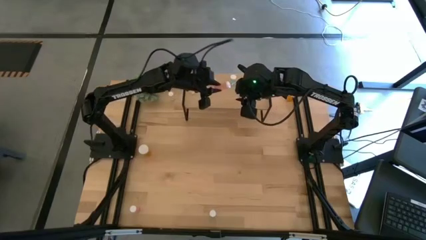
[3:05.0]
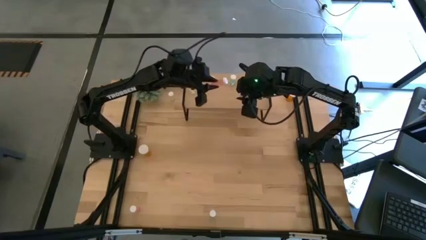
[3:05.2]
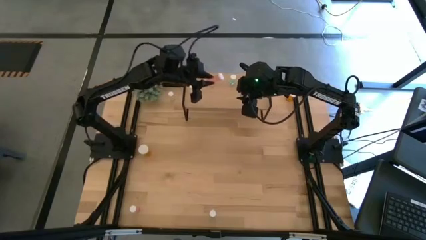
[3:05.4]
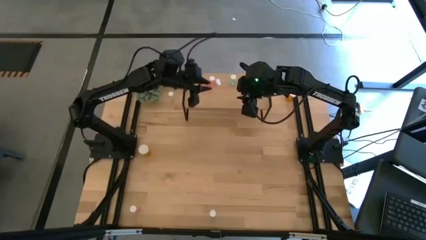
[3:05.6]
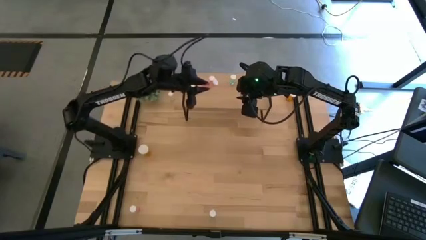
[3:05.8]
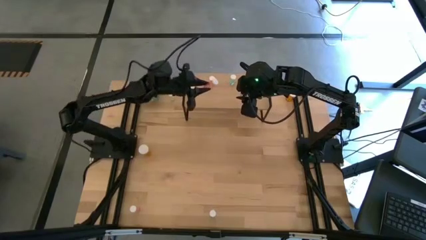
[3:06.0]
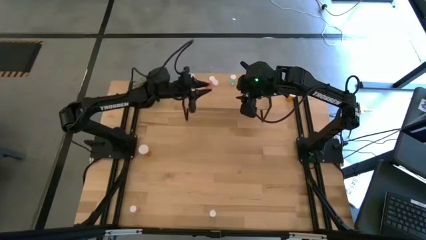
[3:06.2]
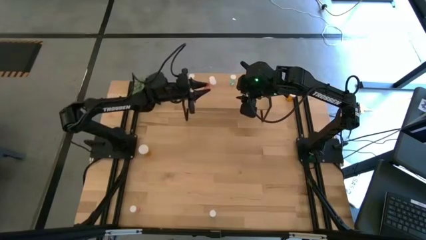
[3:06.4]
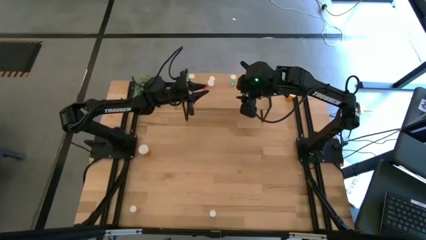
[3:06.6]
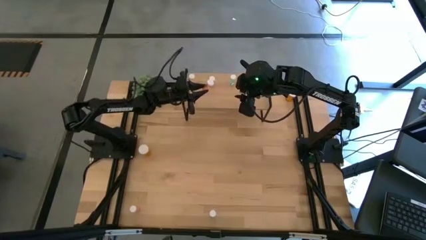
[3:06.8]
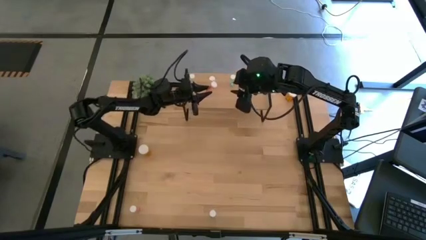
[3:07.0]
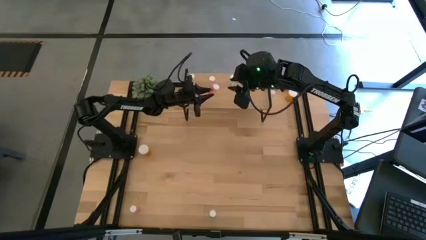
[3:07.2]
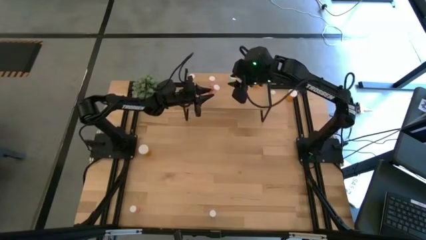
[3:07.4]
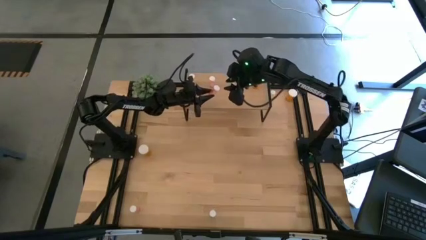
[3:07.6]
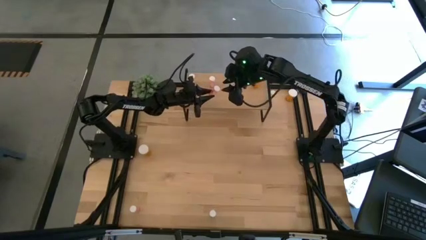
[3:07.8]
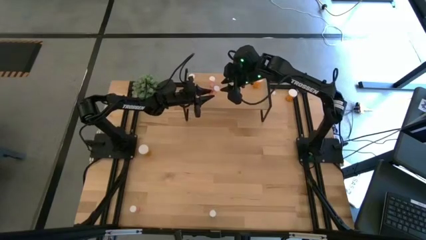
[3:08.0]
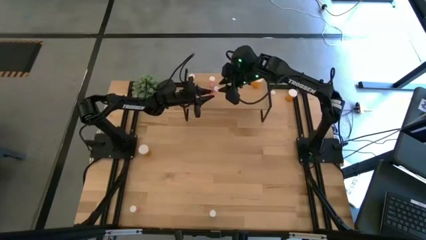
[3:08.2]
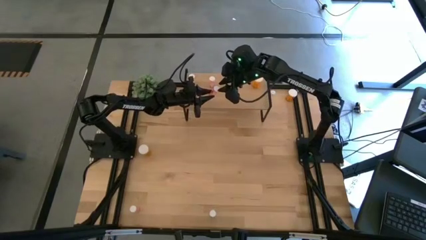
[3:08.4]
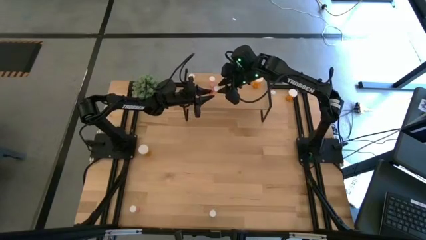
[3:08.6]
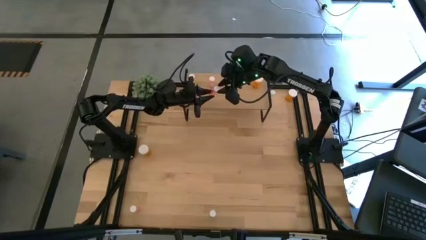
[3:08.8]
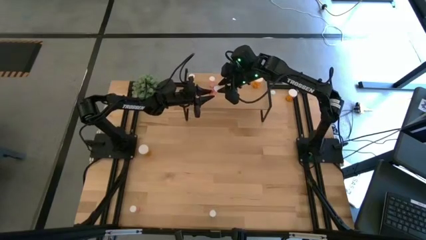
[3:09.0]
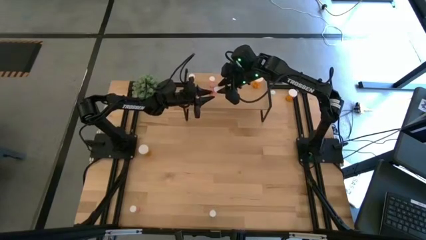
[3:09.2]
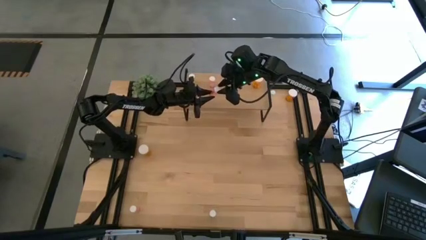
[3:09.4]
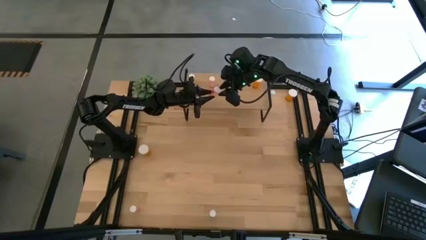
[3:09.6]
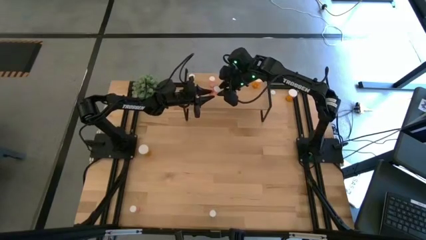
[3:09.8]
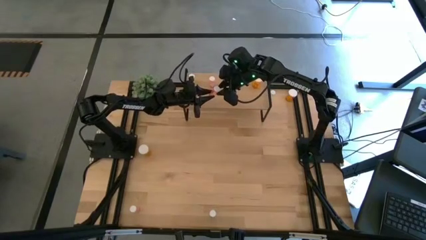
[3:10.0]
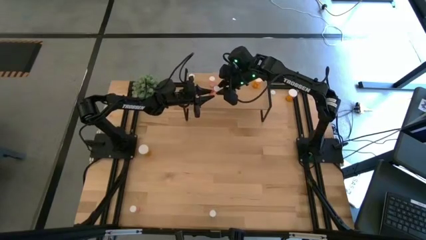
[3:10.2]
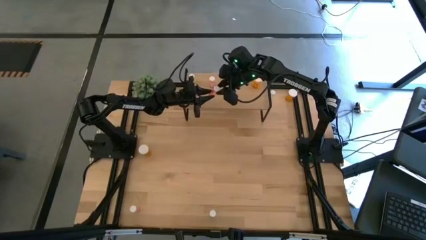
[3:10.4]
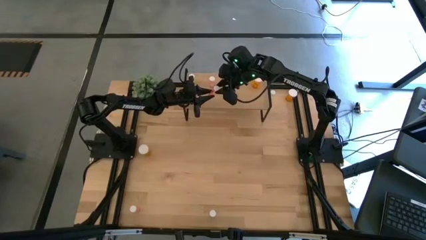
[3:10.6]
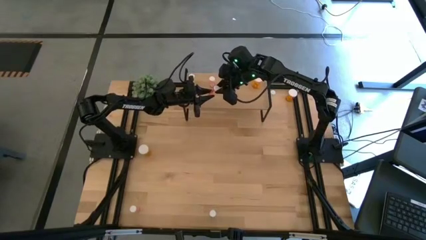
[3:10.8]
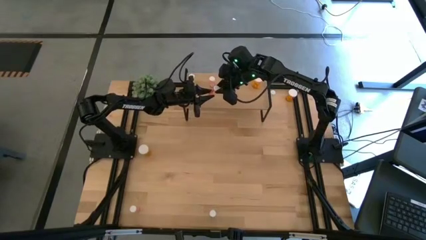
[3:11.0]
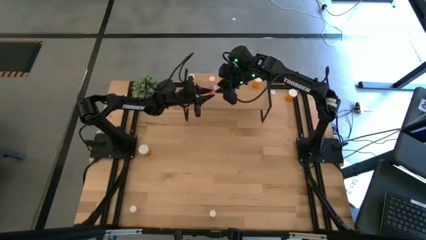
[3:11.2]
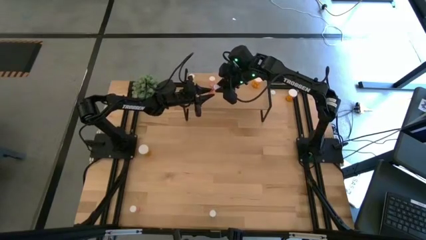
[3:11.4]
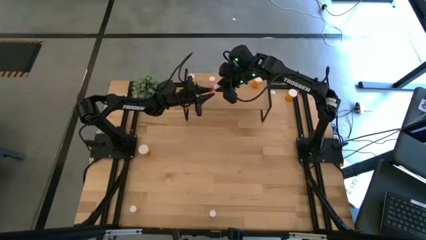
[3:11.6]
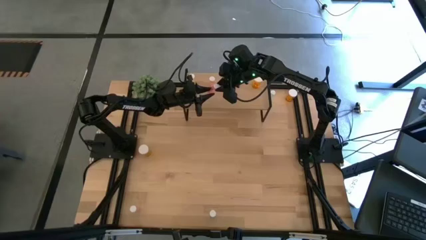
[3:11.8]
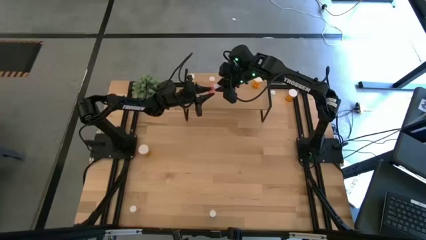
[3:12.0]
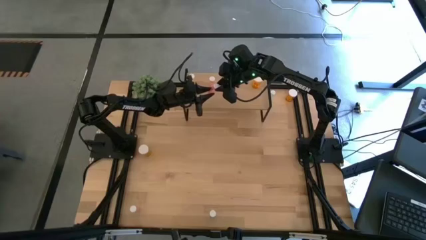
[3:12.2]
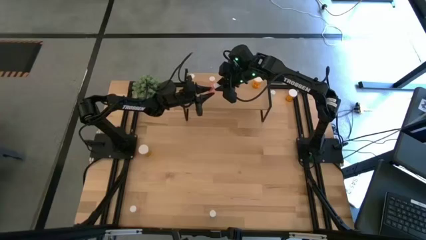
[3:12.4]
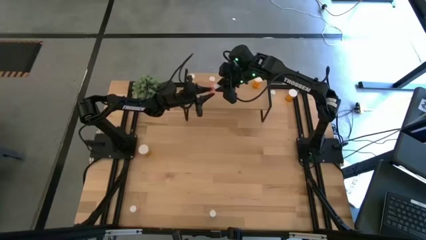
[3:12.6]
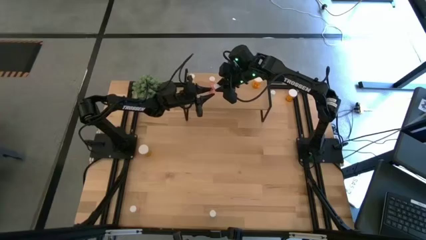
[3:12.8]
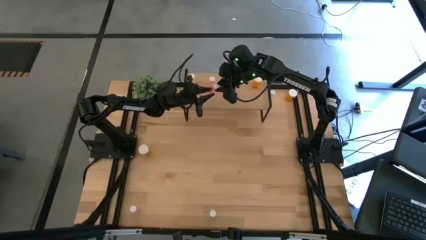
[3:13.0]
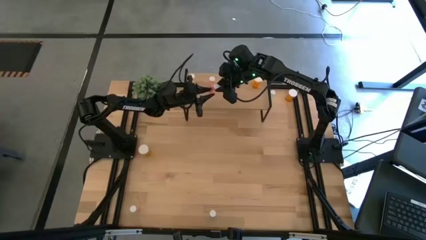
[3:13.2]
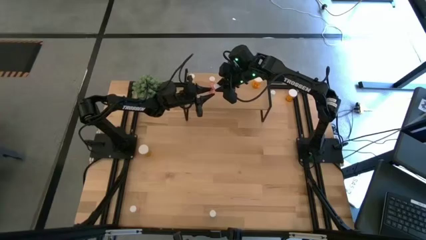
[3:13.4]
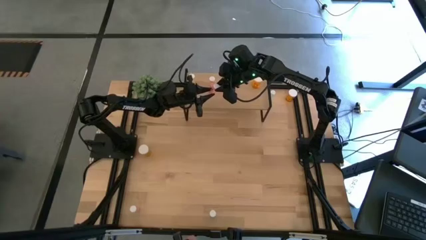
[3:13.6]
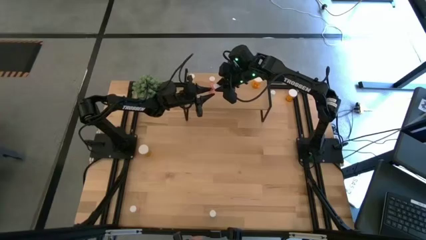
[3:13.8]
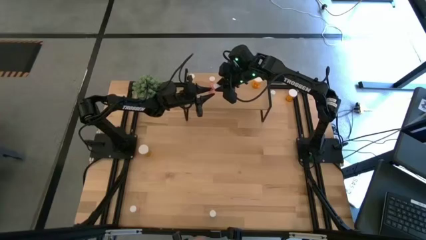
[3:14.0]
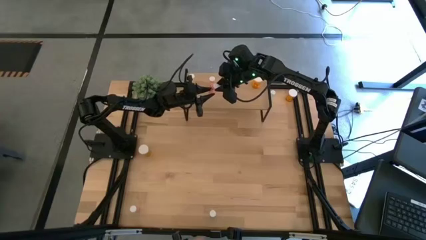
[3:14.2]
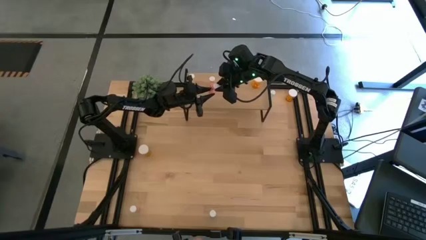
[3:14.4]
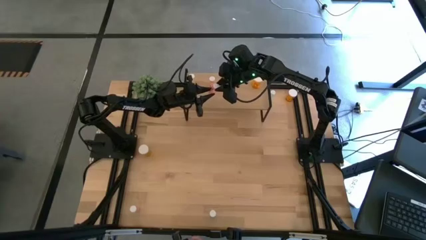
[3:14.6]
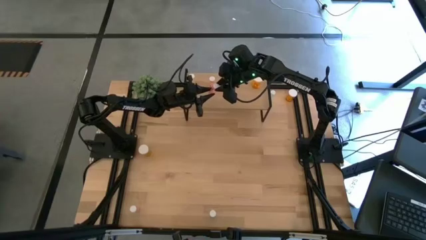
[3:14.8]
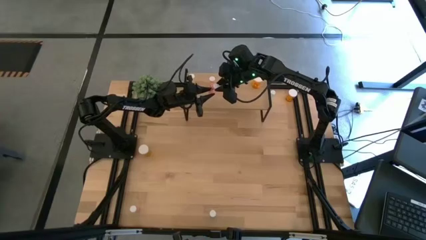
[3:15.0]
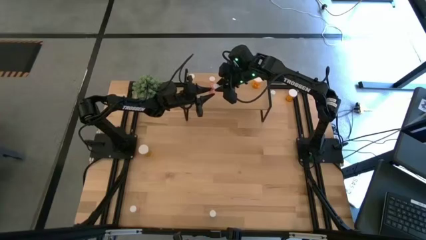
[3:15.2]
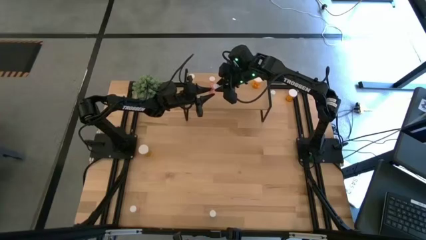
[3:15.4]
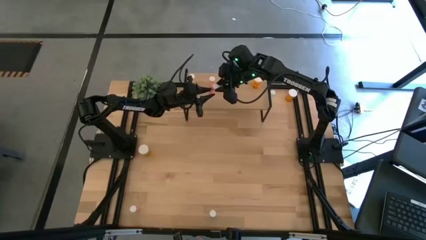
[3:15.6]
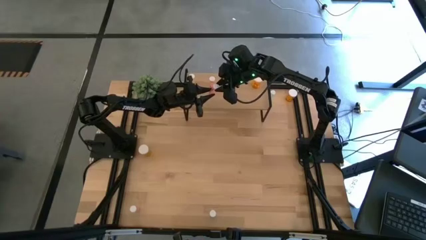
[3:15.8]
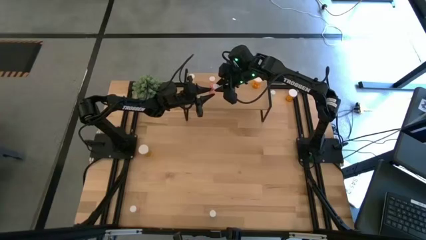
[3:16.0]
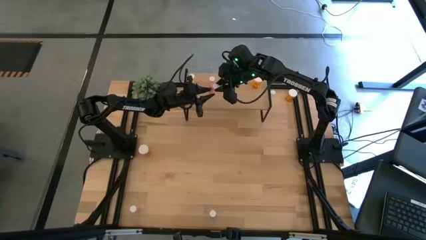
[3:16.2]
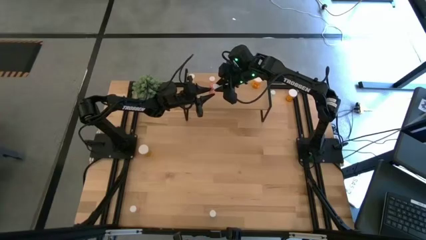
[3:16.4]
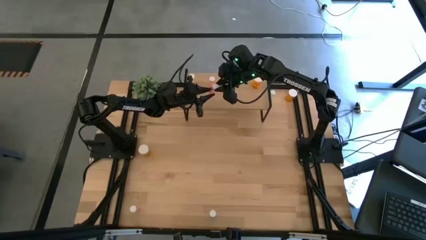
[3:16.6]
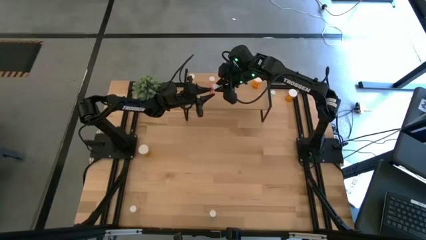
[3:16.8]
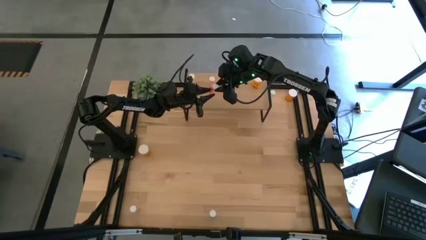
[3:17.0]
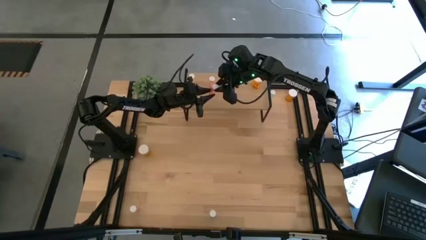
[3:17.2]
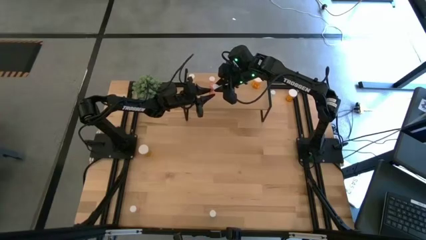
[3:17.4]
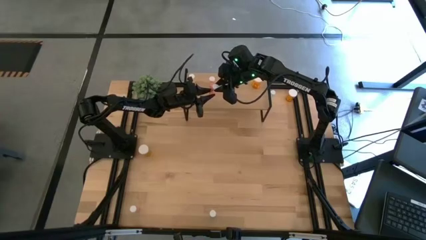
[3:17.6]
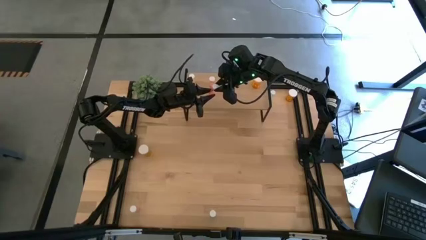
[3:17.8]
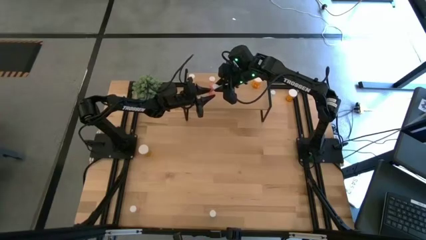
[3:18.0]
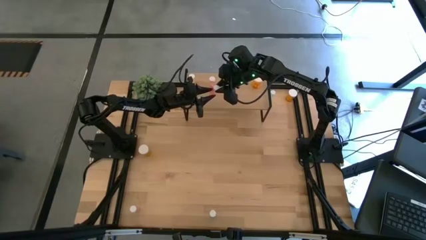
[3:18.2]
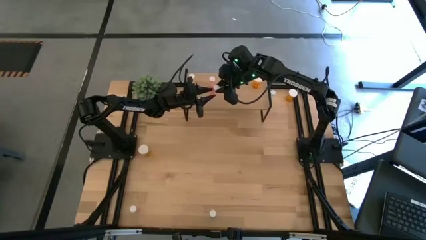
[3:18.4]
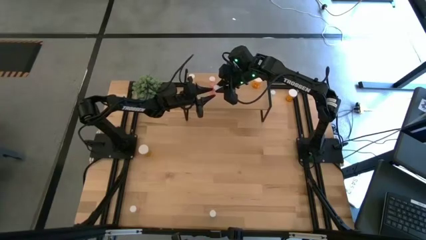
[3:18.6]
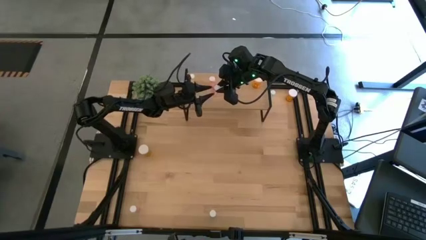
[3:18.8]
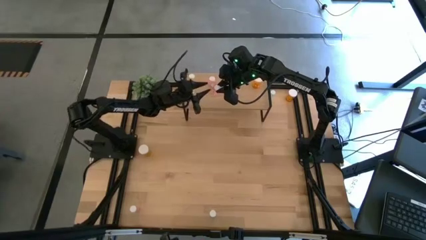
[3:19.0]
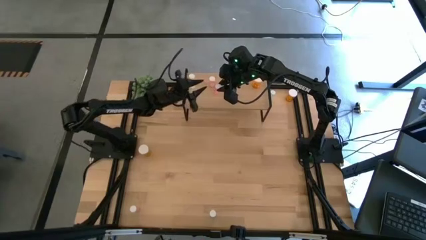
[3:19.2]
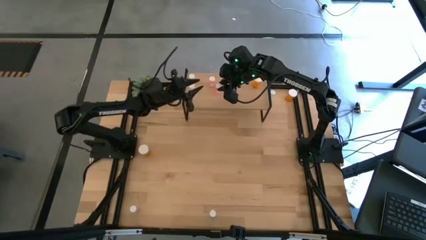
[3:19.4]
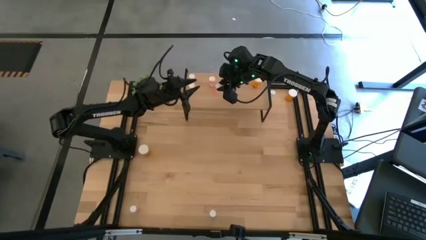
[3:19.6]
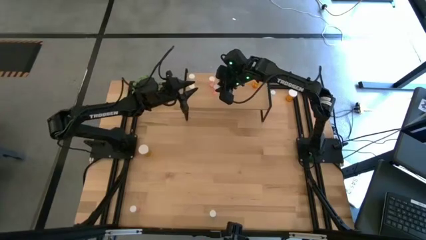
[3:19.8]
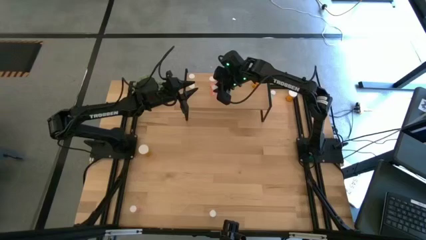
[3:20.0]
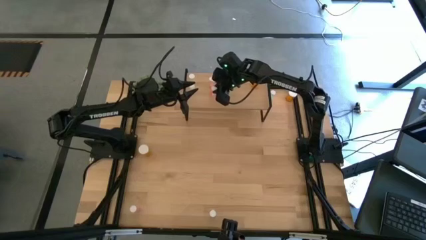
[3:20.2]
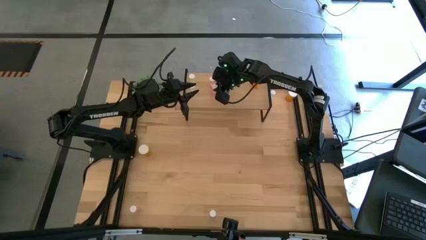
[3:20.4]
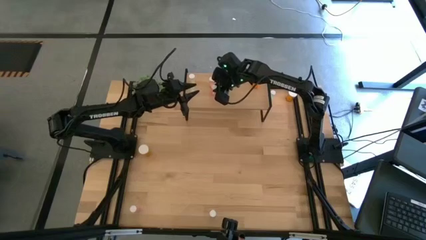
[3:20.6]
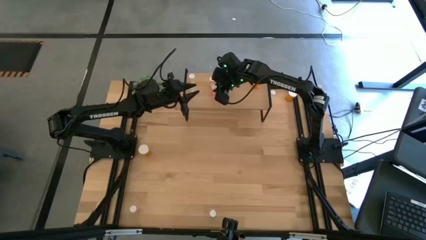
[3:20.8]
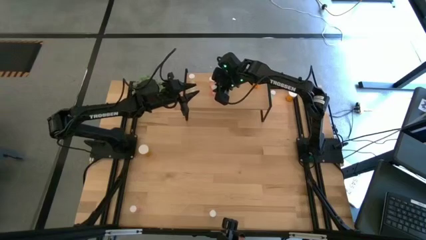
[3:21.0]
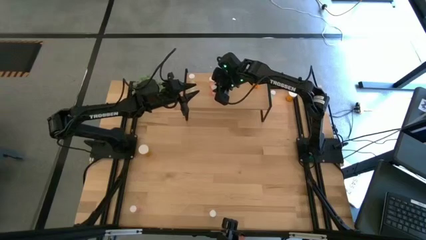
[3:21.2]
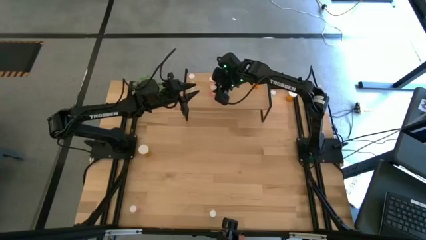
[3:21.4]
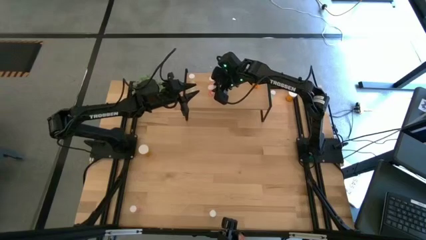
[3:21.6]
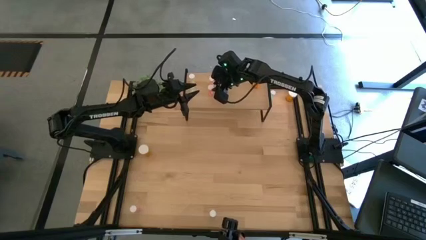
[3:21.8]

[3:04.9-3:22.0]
Task: Pick and place medicine bottles onto shelf by color
Put the top pink pill bottle on the shelf aligned with the other pink pill bottle
